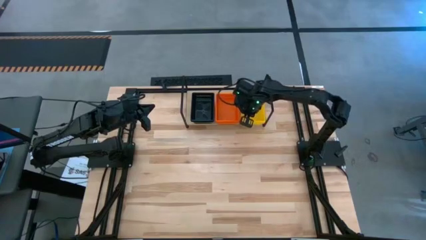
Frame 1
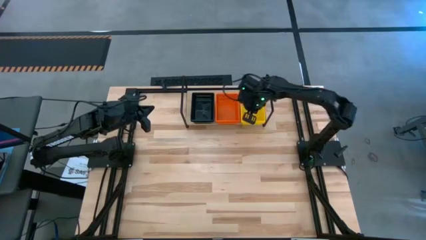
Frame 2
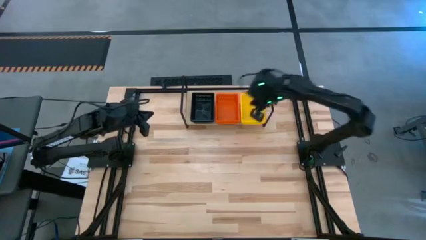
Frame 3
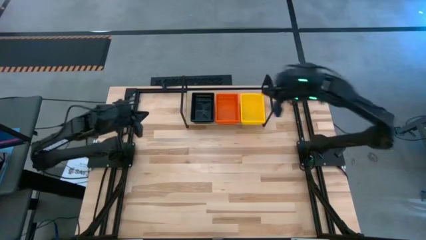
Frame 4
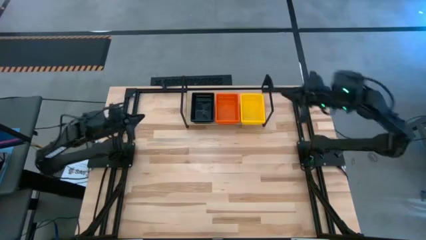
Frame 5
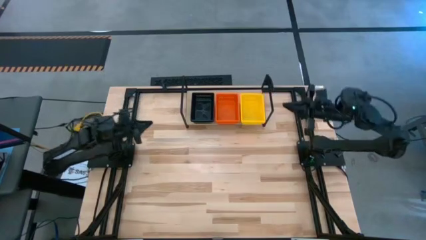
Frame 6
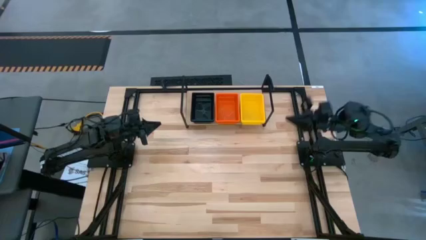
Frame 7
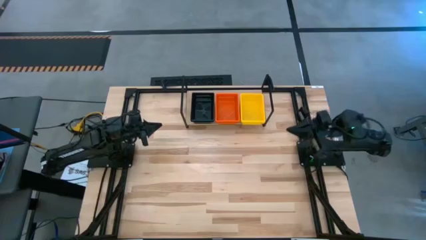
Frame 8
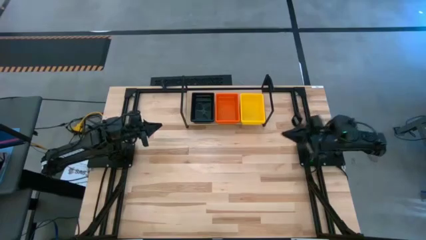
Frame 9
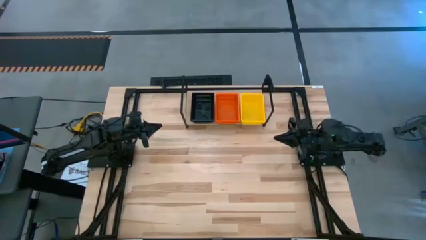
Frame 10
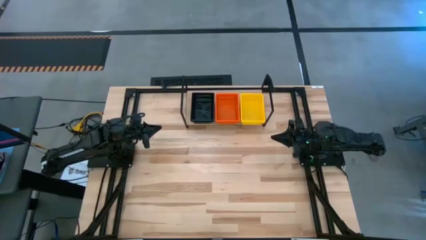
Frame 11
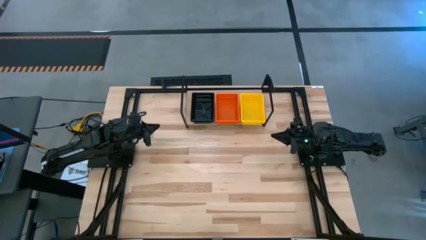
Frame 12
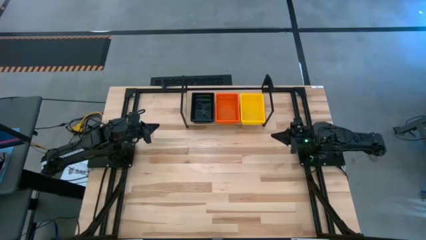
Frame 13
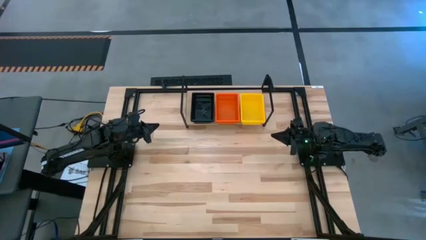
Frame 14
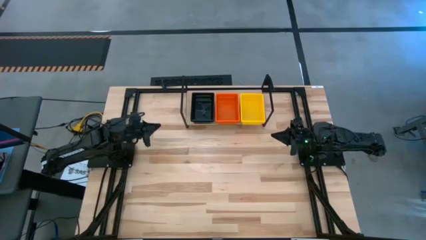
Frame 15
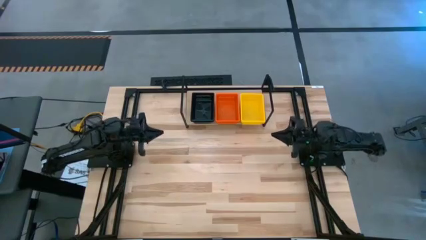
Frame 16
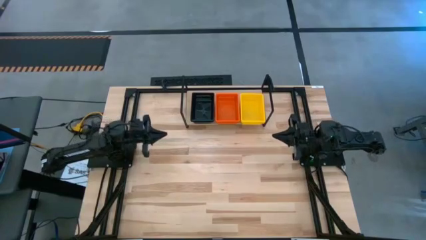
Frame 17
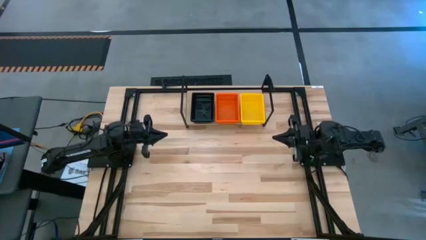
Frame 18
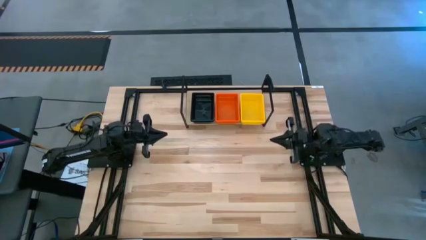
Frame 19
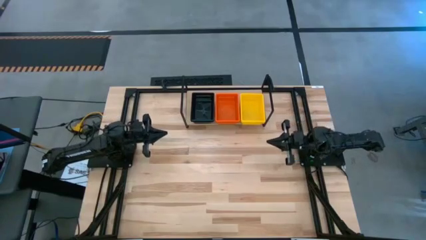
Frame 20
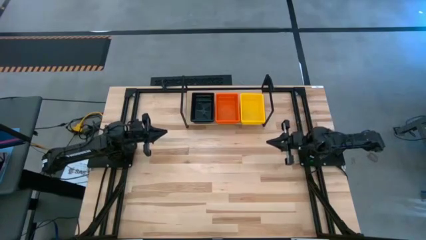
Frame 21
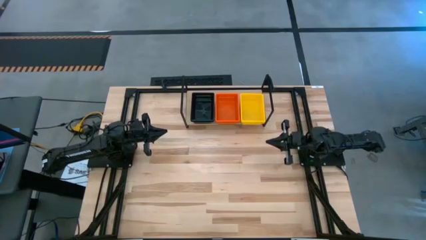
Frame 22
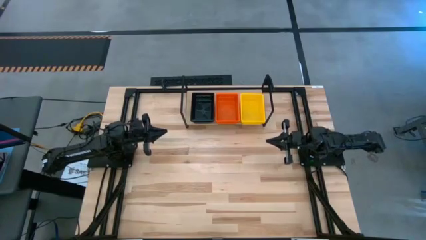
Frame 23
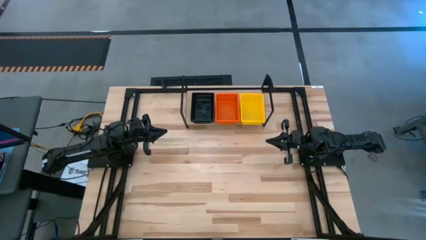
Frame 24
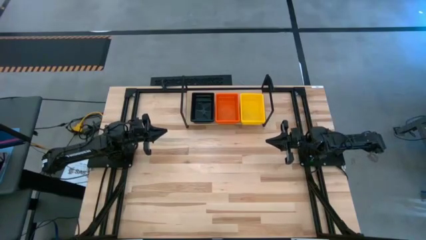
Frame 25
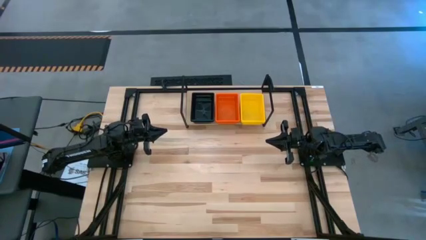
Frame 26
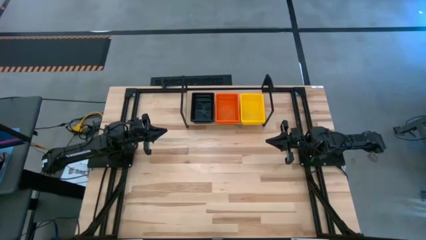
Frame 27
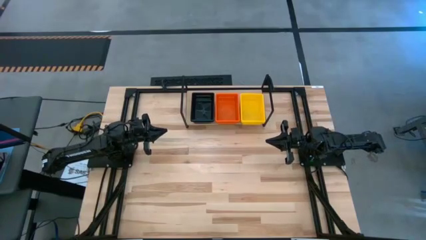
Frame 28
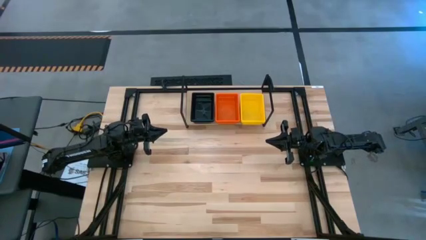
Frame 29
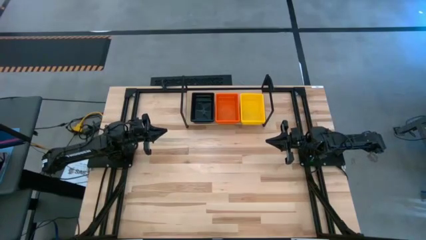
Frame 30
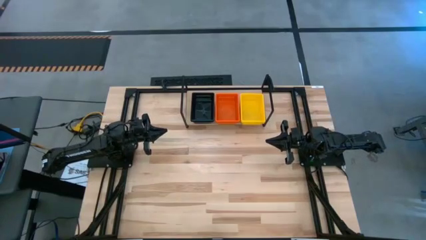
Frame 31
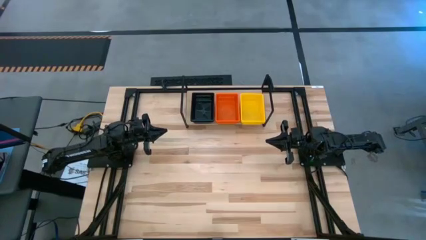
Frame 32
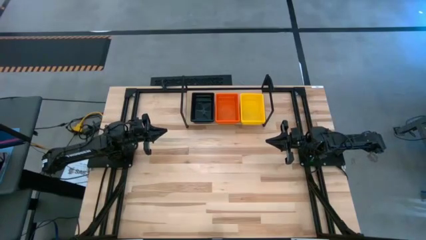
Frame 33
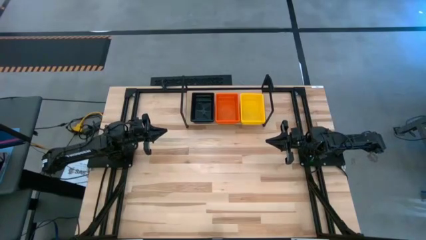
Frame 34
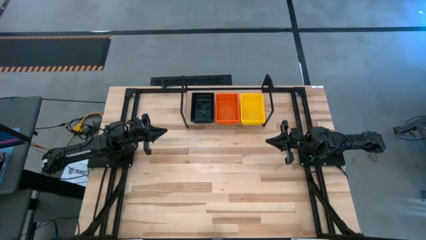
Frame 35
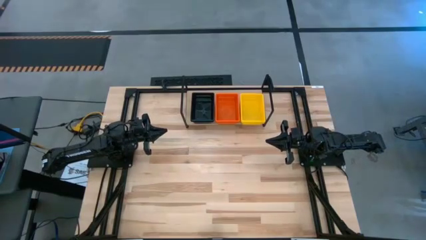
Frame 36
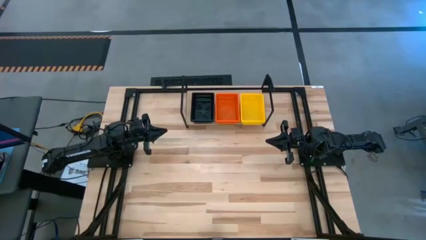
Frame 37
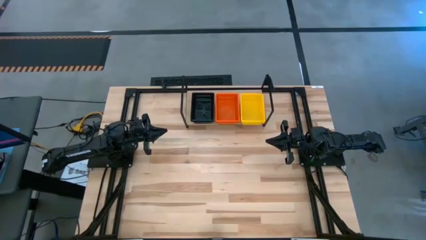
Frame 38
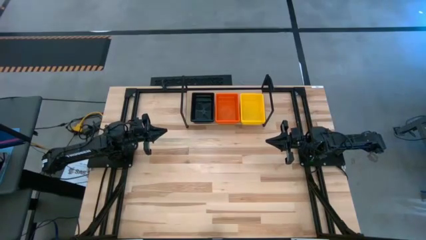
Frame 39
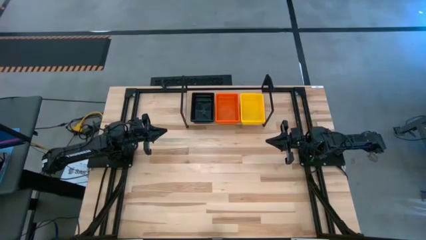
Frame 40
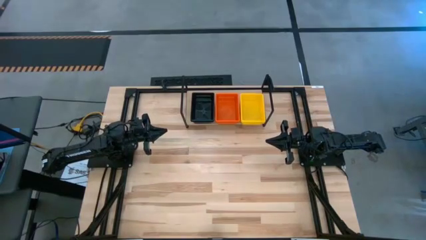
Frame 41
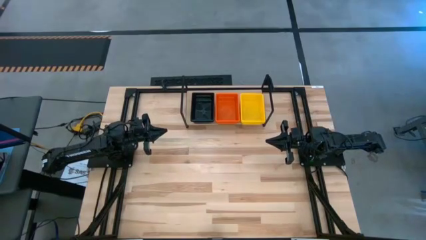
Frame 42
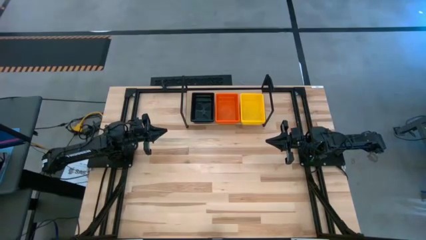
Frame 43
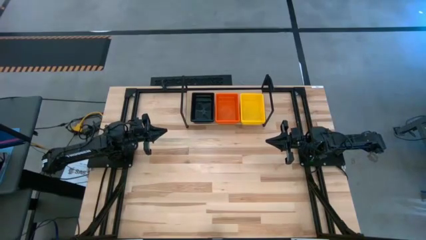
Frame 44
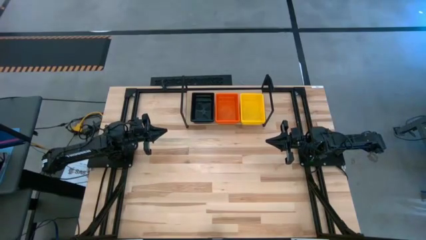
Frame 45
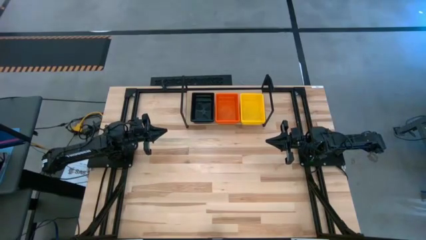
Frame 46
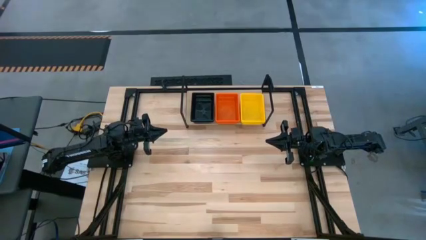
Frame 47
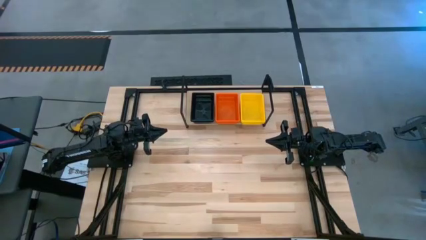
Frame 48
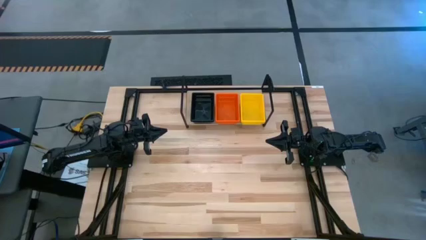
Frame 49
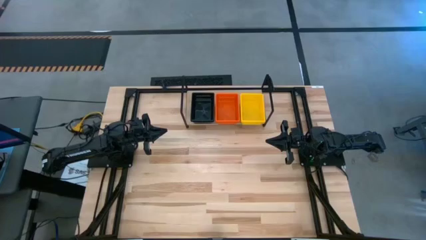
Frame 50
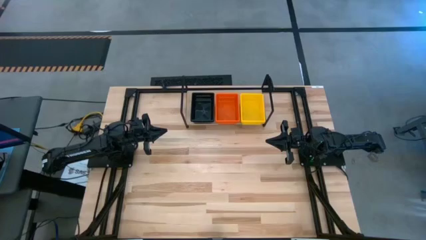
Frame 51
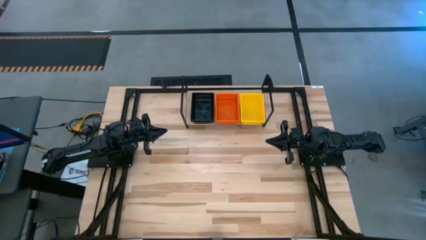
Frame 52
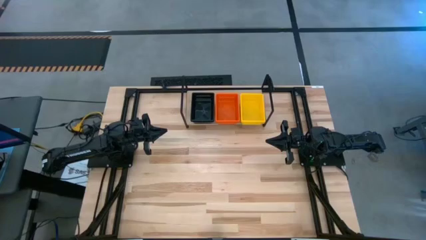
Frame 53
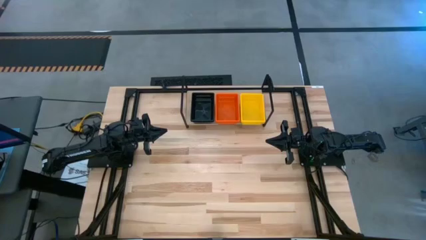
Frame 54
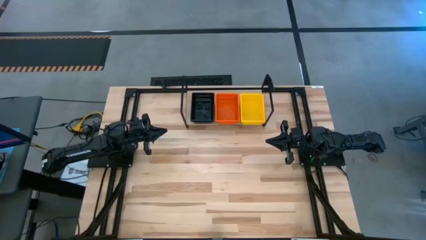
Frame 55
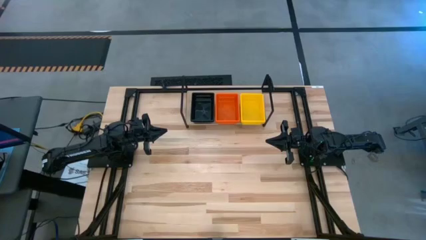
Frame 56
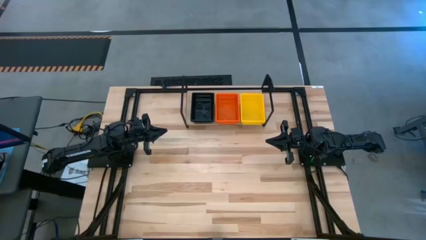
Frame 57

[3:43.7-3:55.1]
Task: Stack baskets on shelf by color
Return to Home Position
